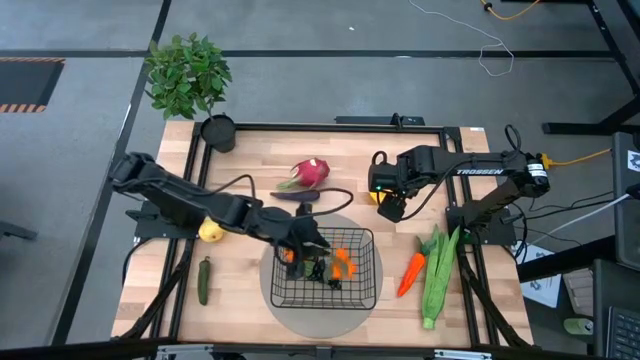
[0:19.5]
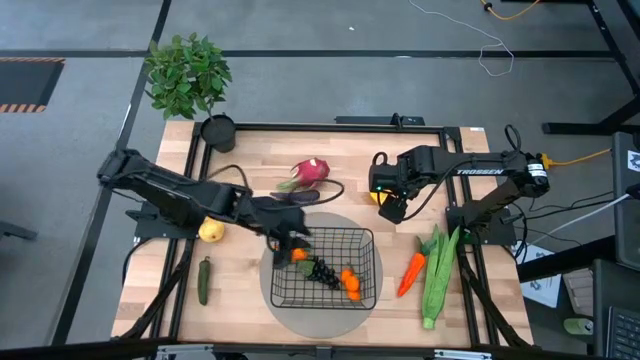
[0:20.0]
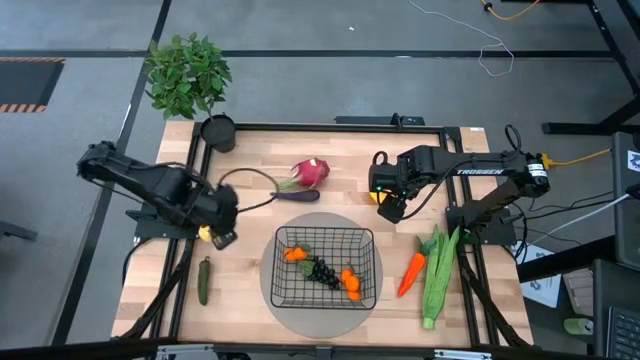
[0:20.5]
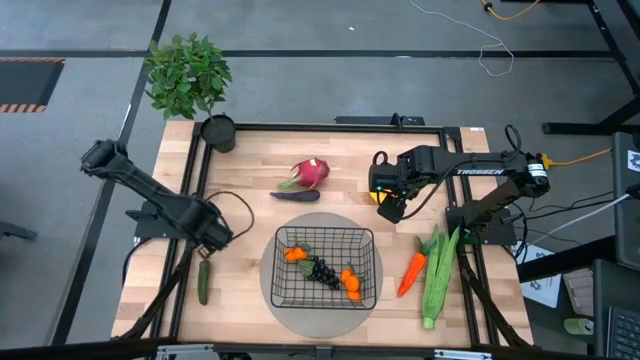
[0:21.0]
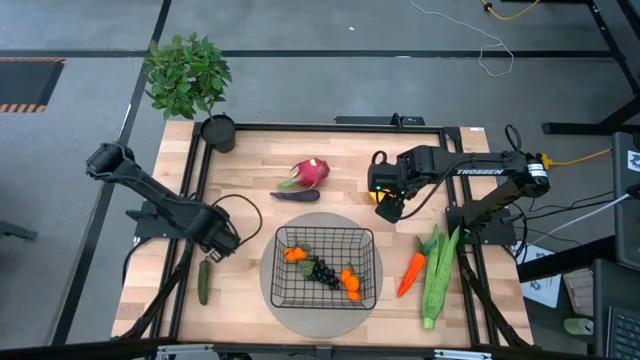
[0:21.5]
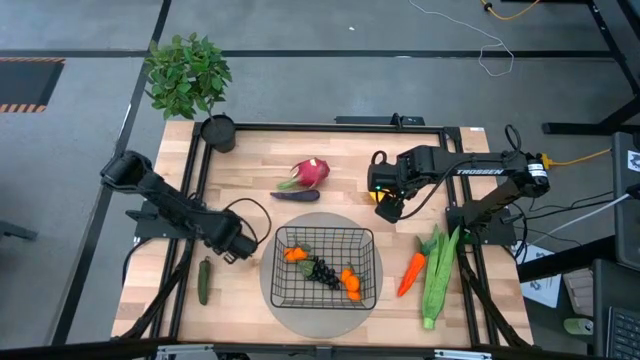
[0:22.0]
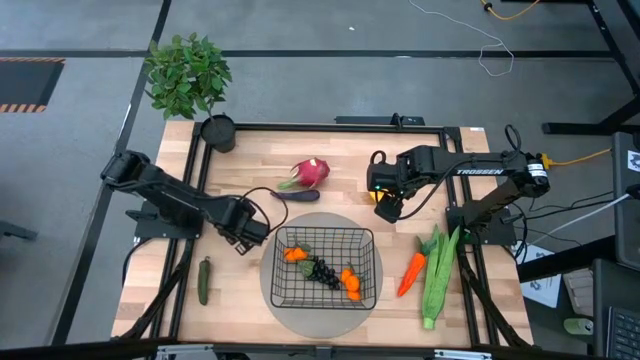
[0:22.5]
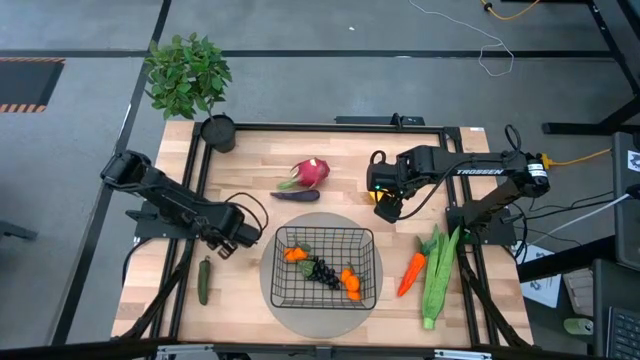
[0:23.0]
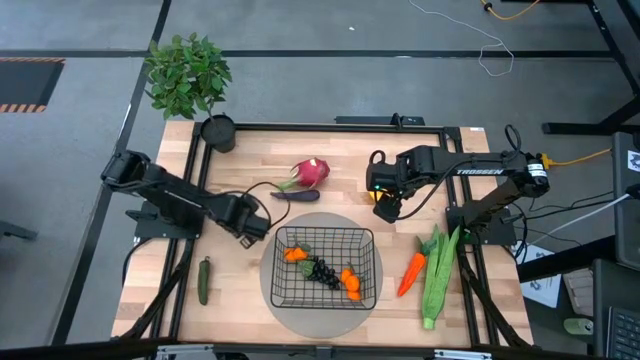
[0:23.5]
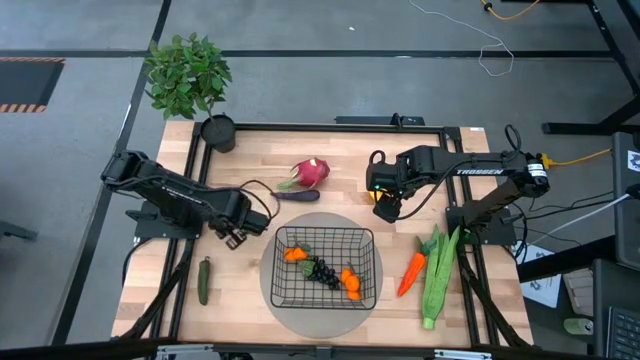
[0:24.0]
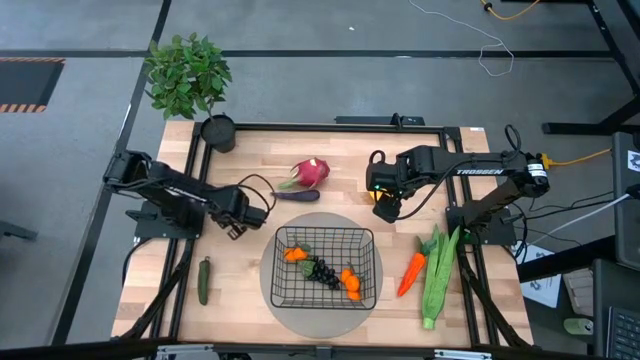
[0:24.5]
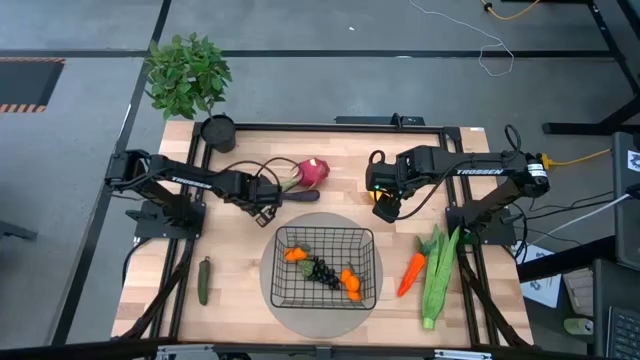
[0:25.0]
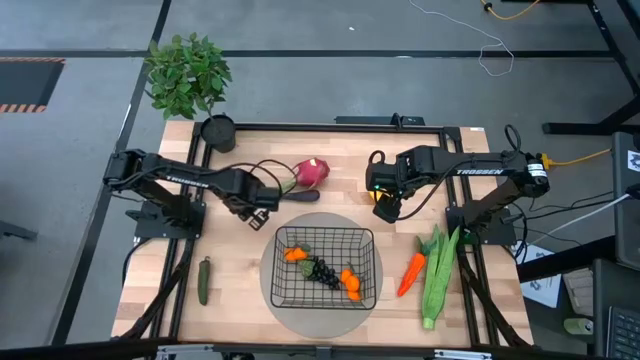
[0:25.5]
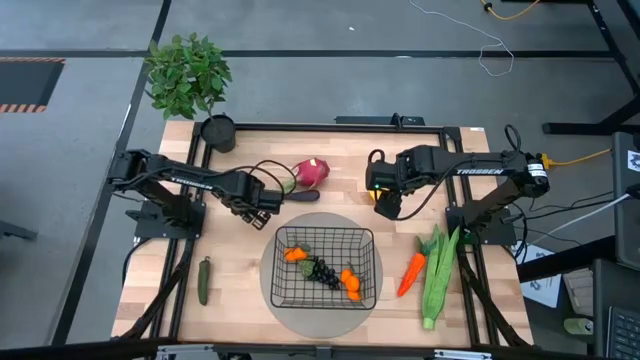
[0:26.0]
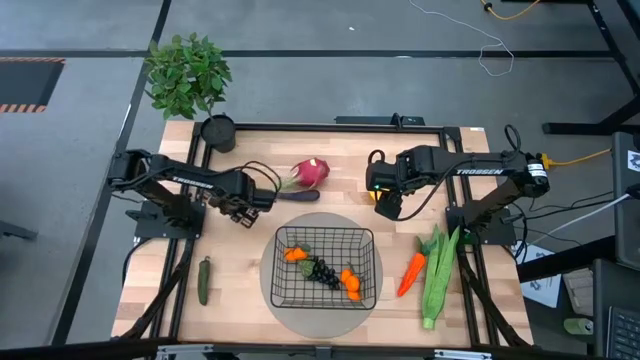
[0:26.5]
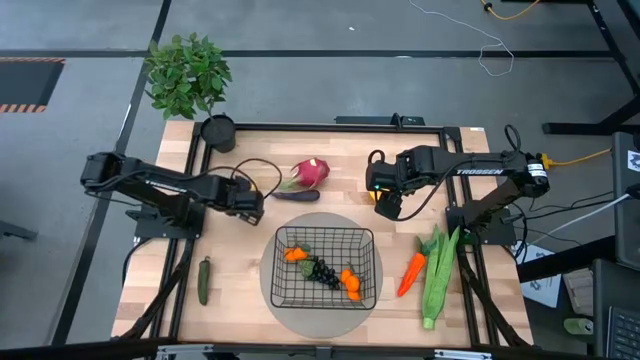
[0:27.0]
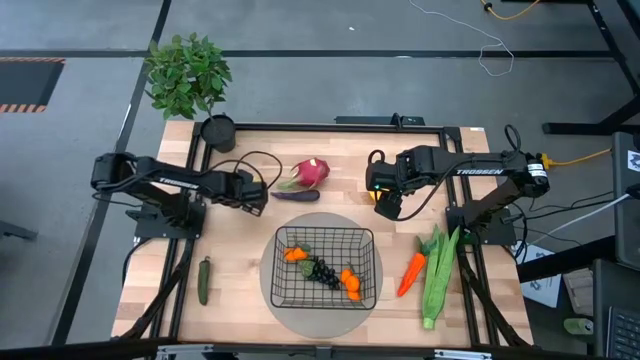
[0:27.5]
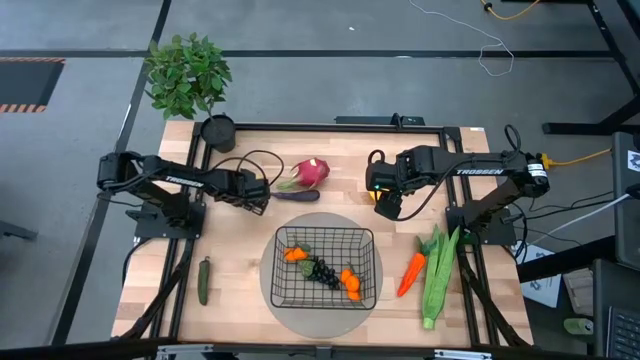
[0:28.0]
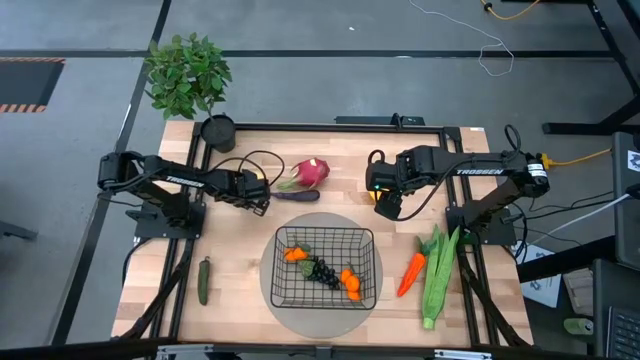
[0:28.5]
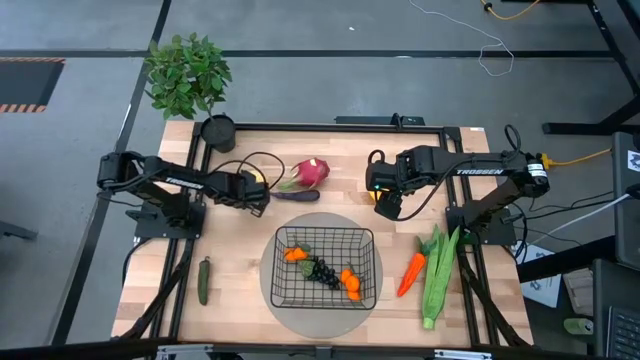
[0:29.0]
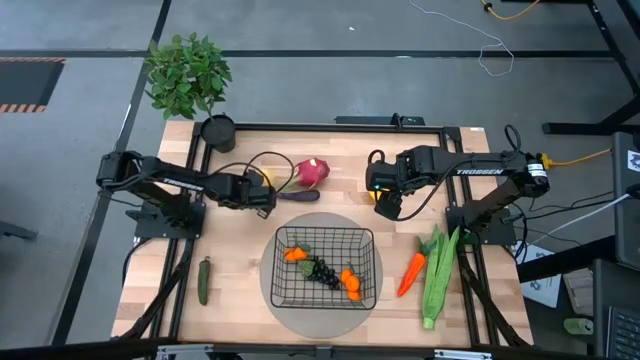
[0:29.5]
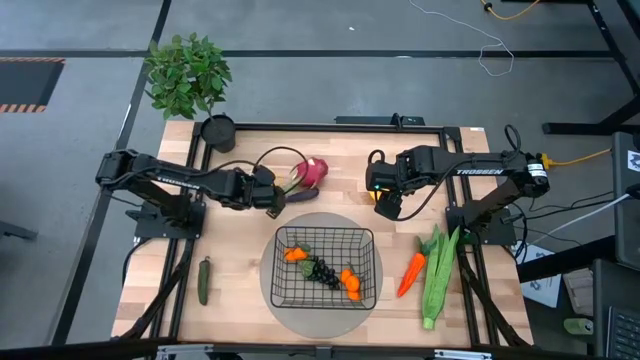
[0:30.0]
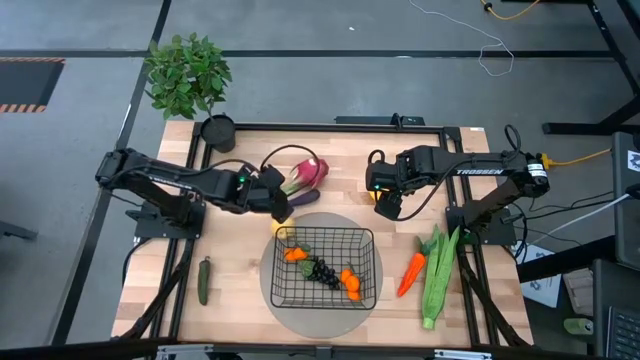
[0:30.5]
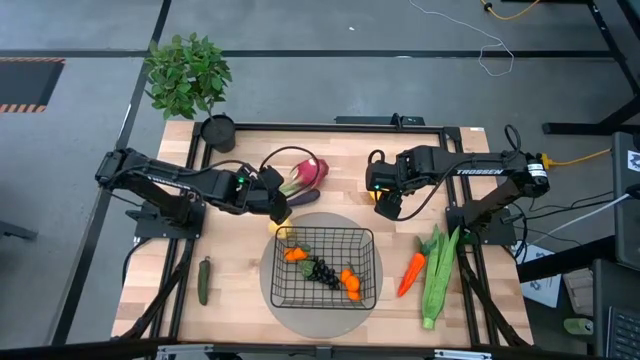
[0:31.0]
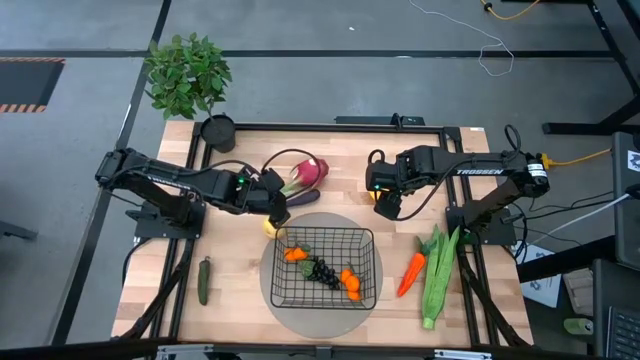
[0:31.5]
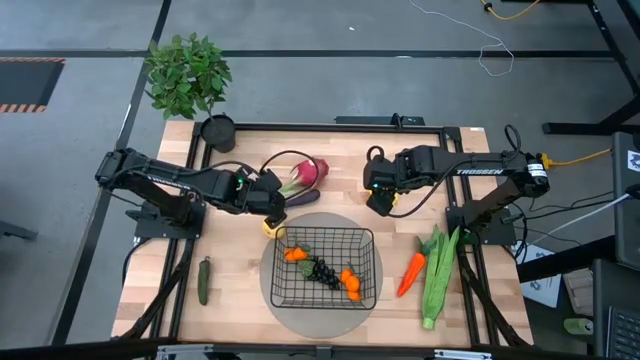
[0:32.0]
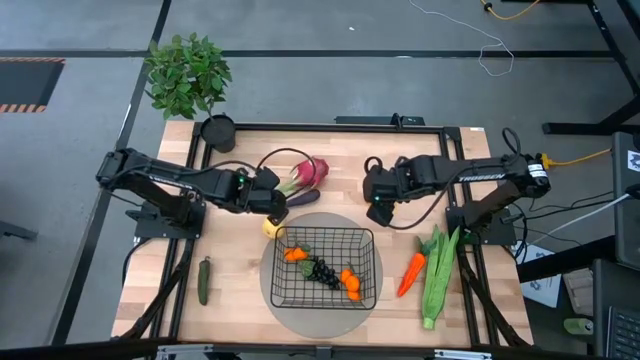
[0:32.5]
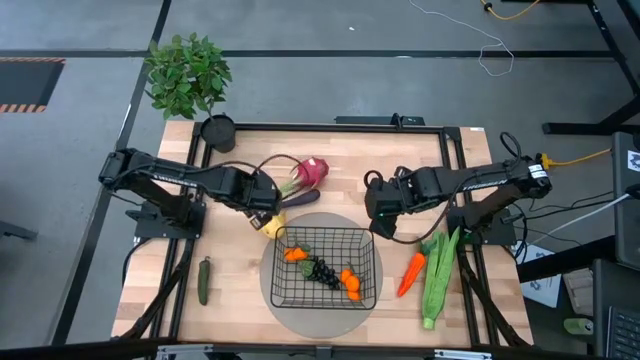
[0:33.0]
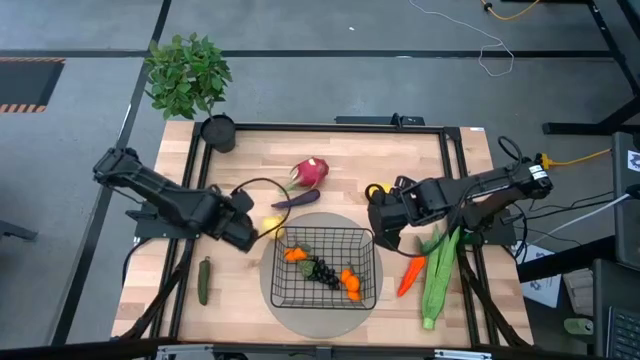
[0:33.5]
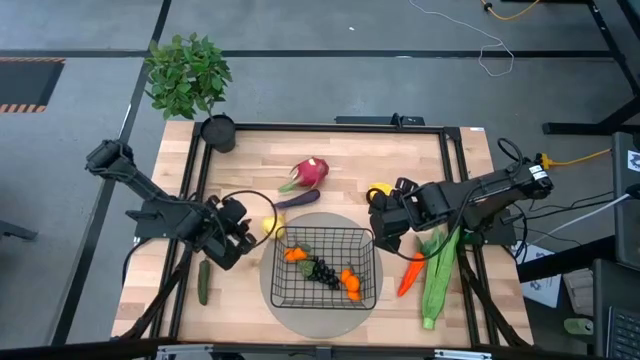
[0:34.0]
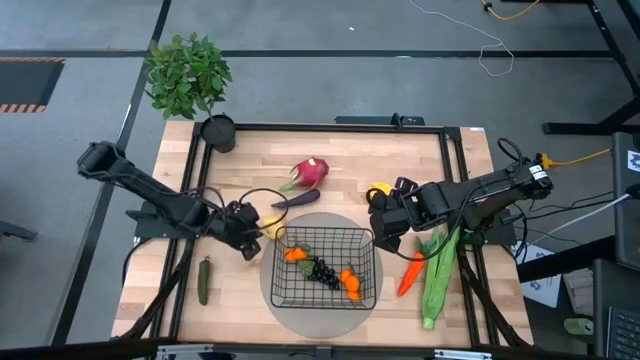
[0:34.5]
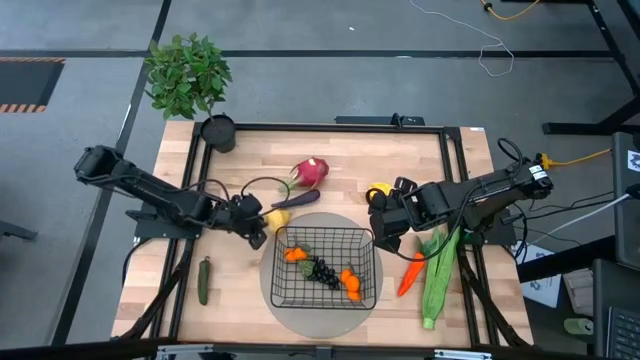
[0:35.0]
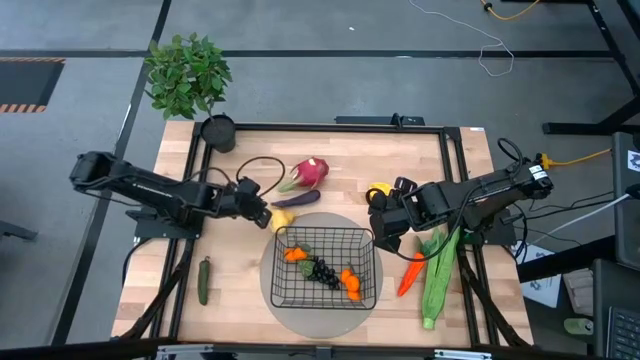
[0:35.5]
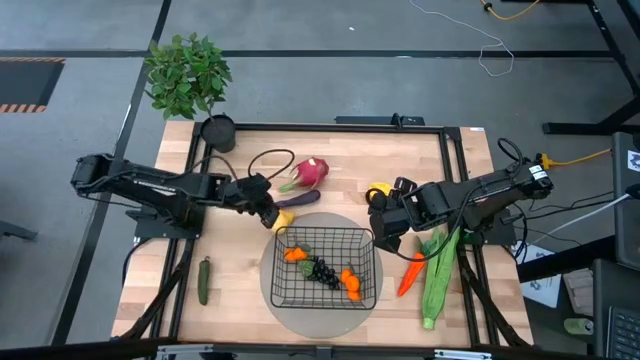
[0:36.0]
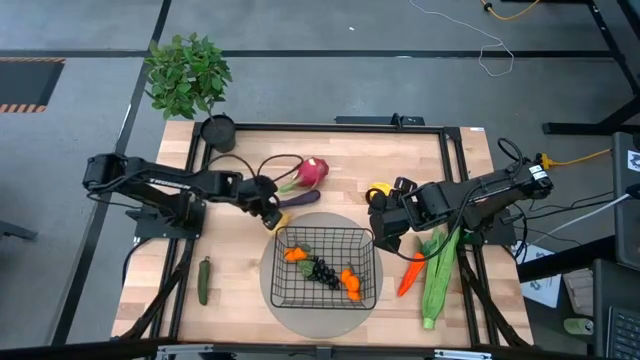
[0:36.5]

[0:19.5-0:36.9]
Task: Build produce basket
Put the yellow pear into the black wire basket

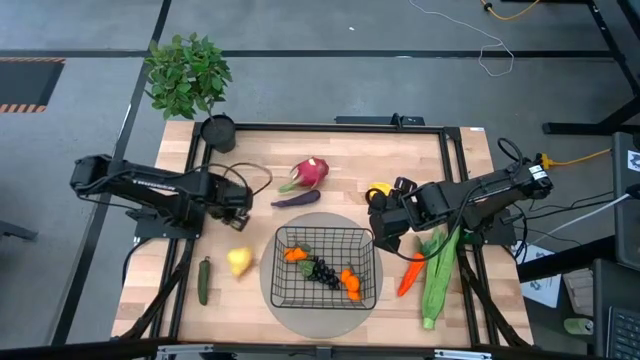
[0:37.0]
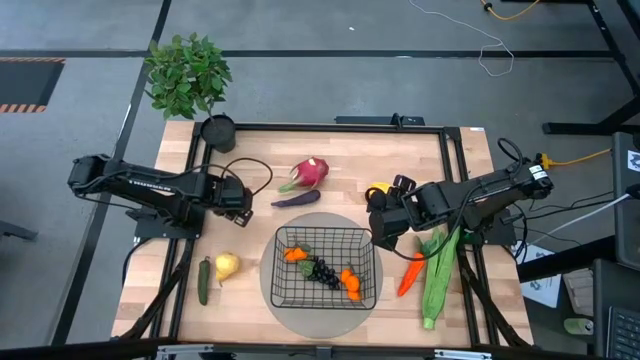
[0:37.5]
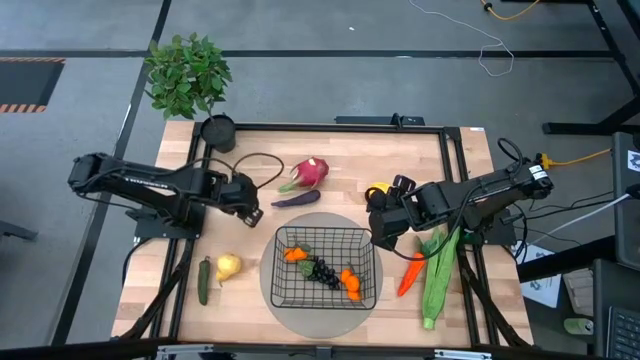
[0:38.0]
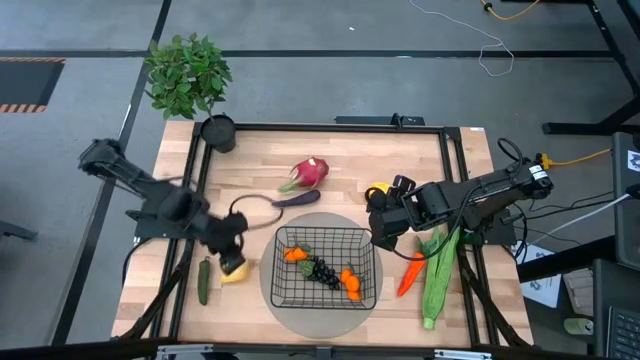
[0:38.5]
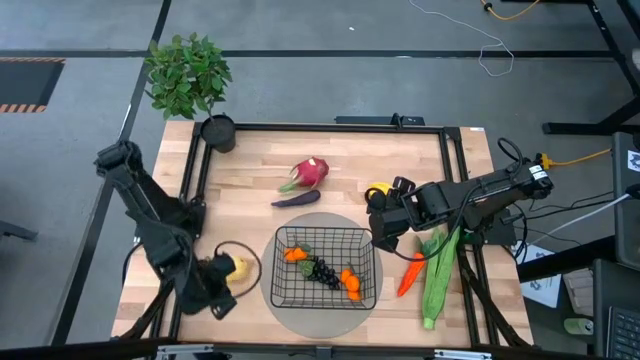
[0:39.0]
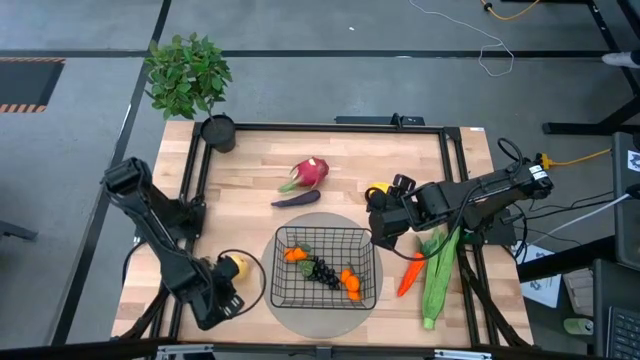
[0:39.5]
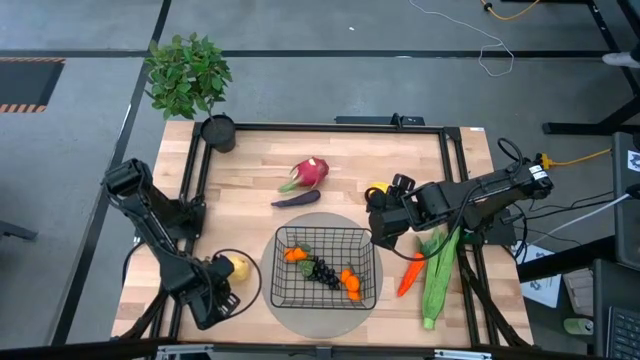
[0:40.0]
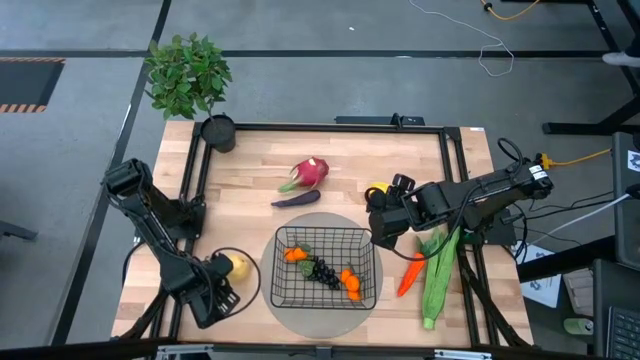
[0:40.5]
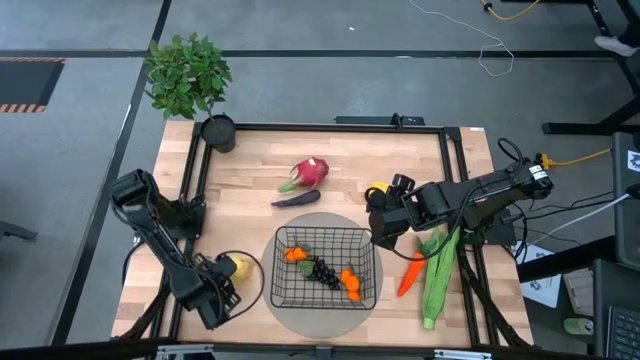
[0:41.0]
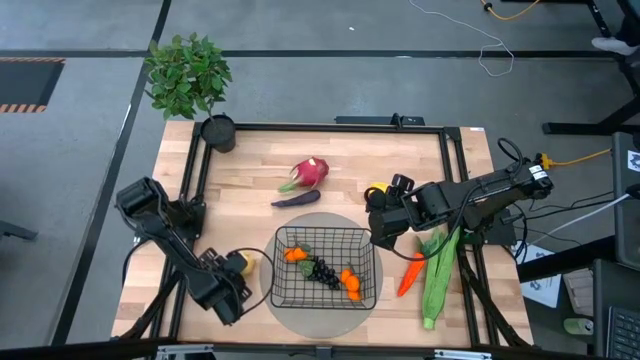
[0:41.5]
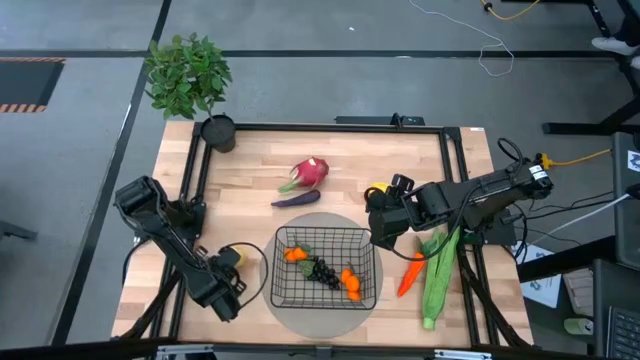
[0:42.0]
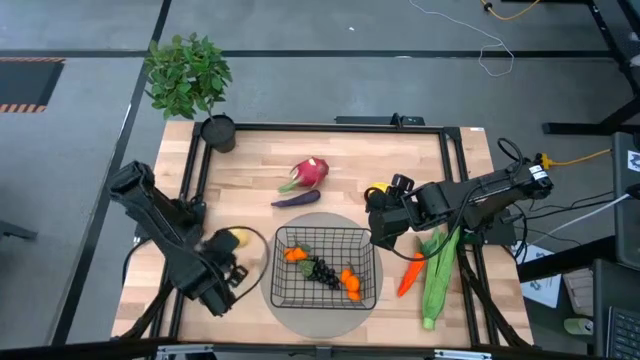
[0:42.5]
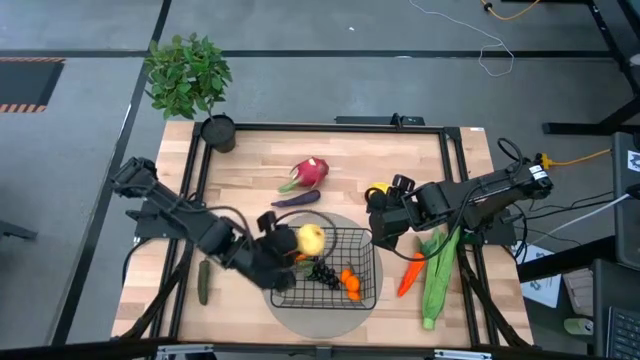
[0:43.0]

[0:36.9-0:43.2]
Put the yellow pear into the black wire basket
